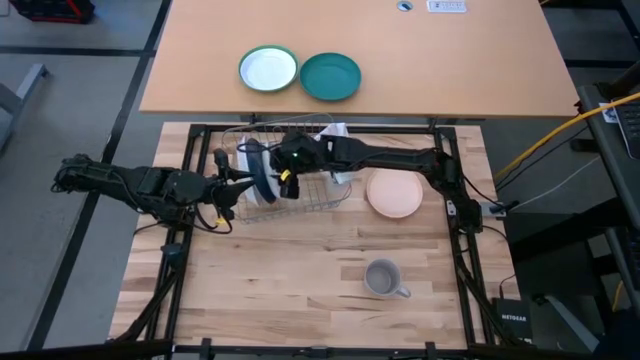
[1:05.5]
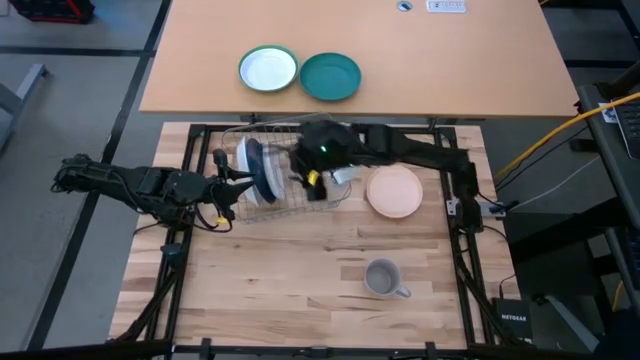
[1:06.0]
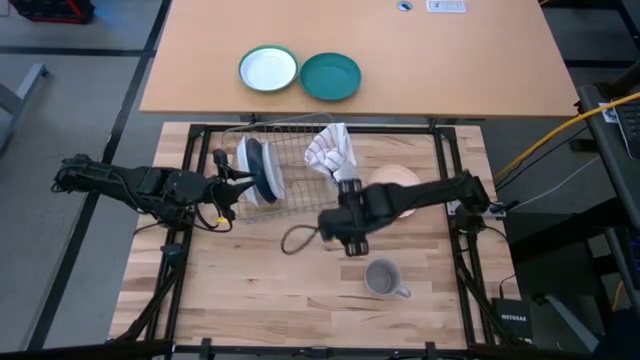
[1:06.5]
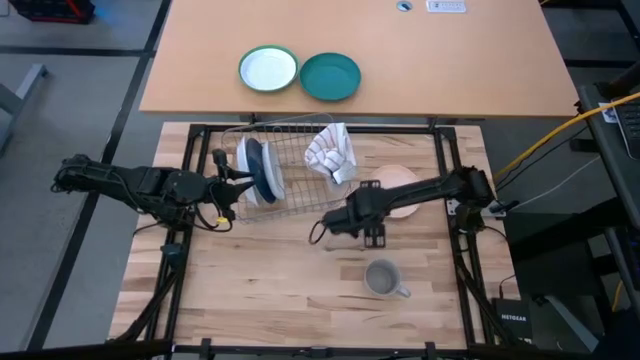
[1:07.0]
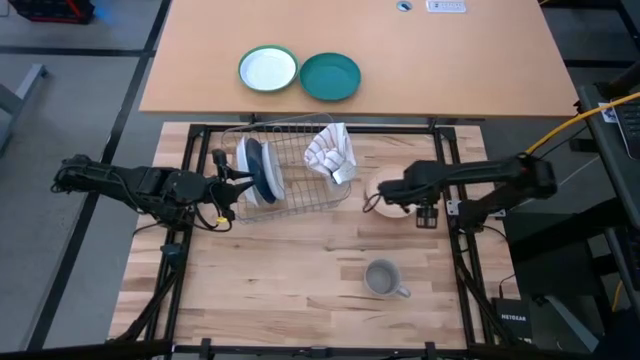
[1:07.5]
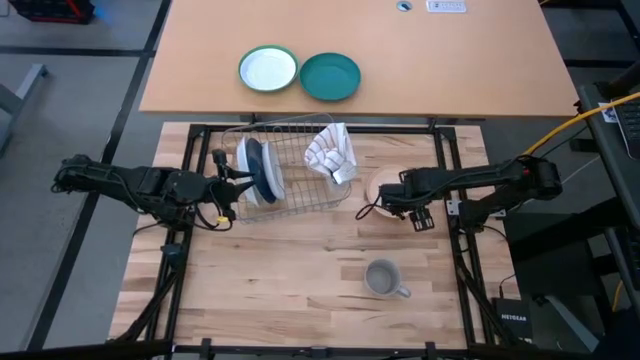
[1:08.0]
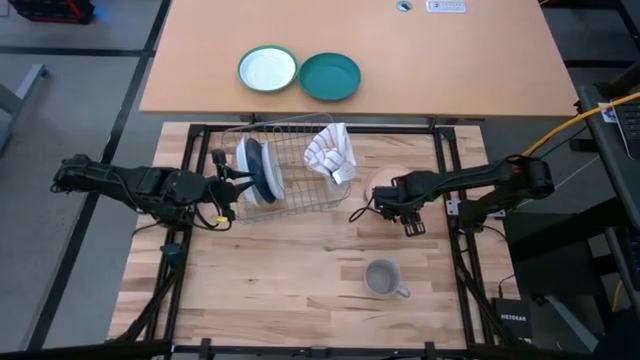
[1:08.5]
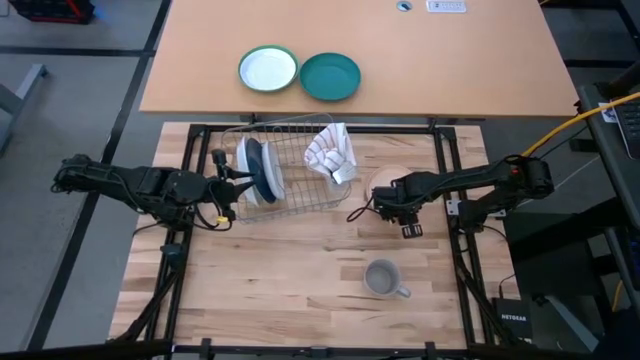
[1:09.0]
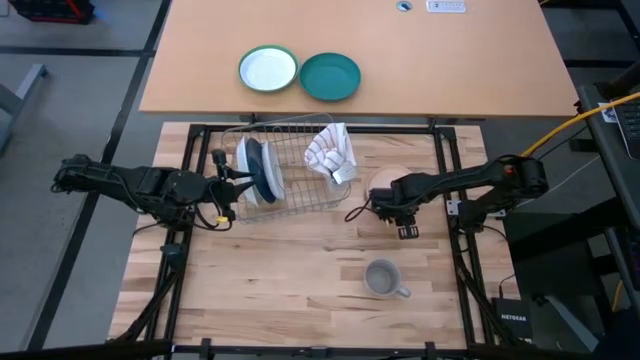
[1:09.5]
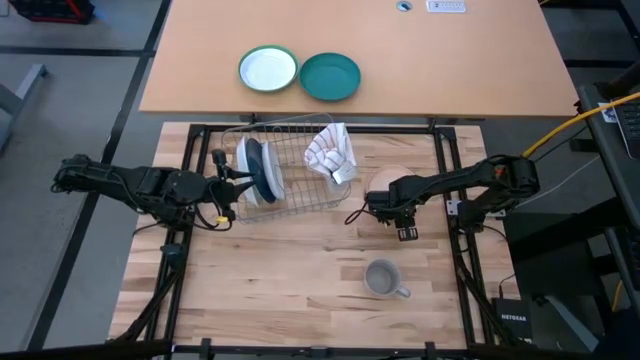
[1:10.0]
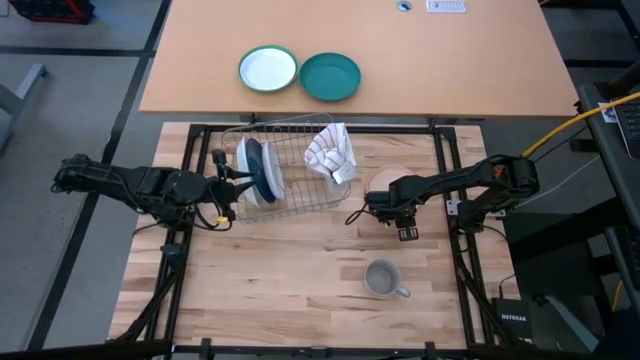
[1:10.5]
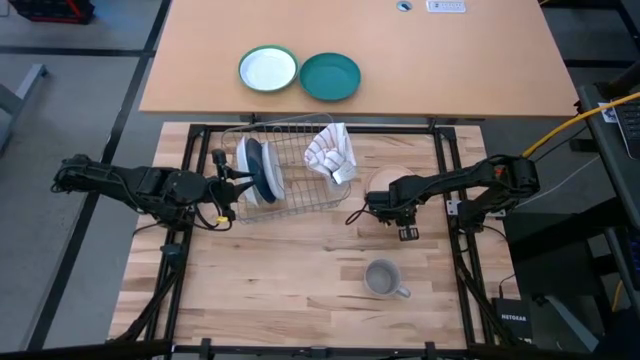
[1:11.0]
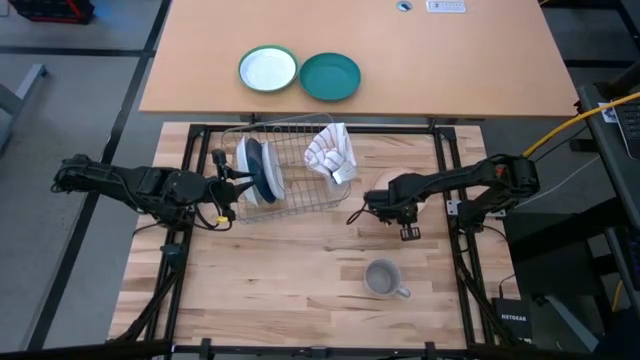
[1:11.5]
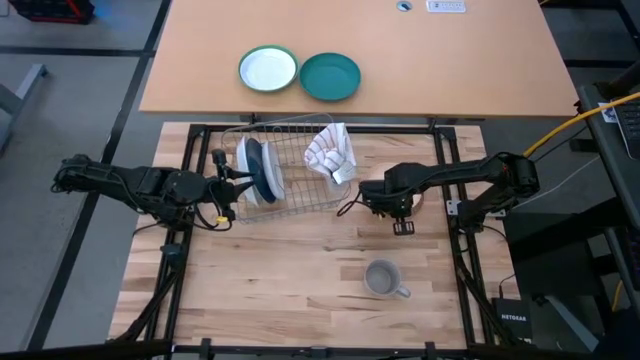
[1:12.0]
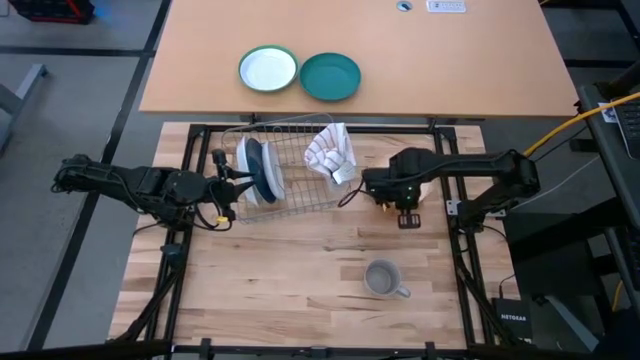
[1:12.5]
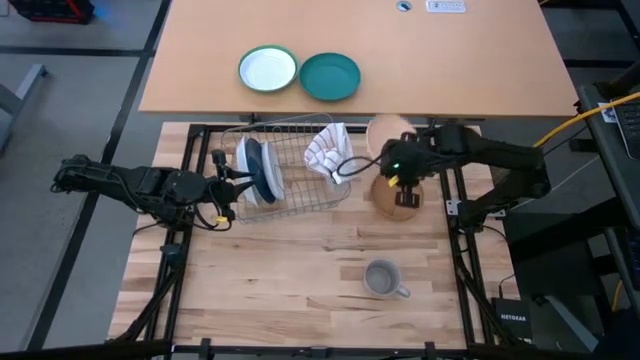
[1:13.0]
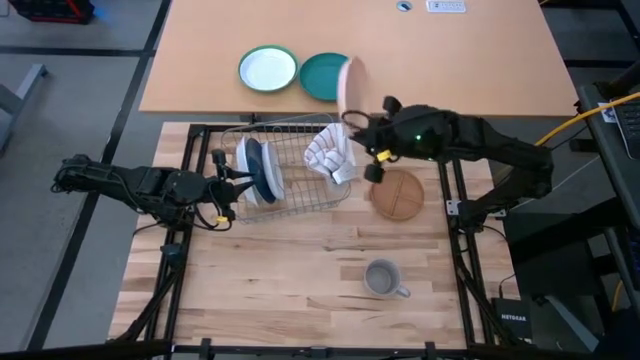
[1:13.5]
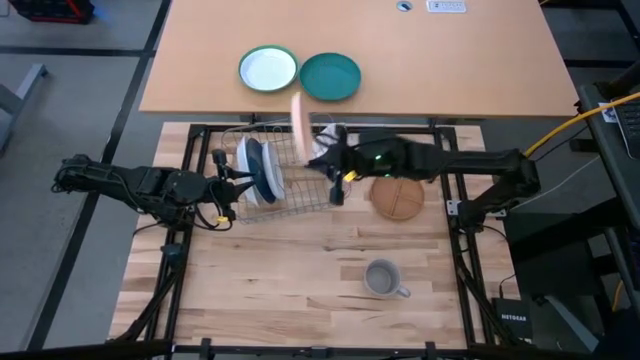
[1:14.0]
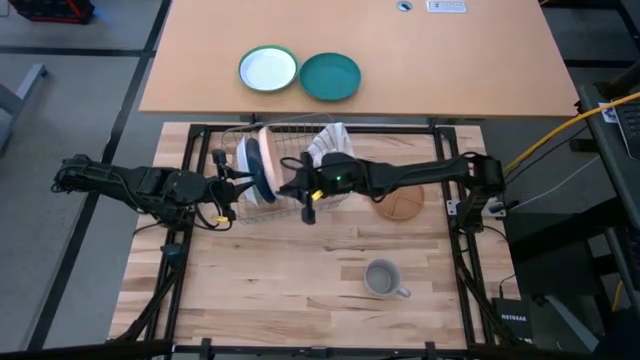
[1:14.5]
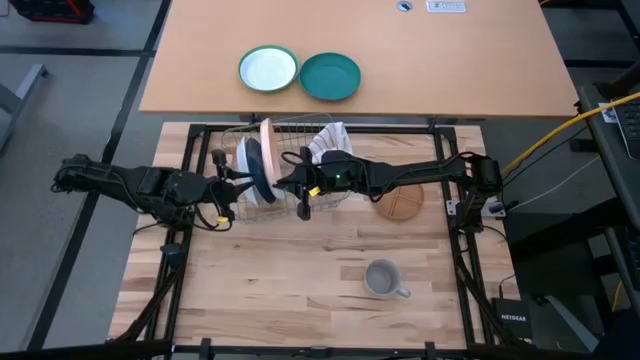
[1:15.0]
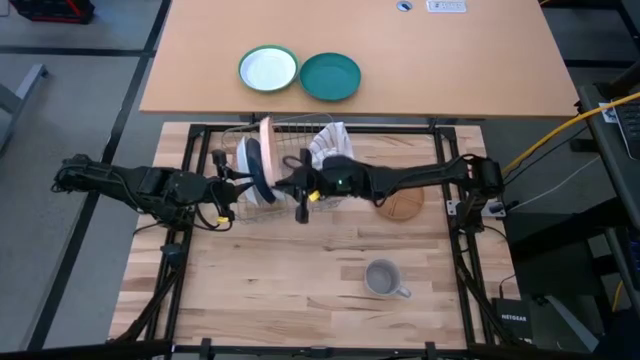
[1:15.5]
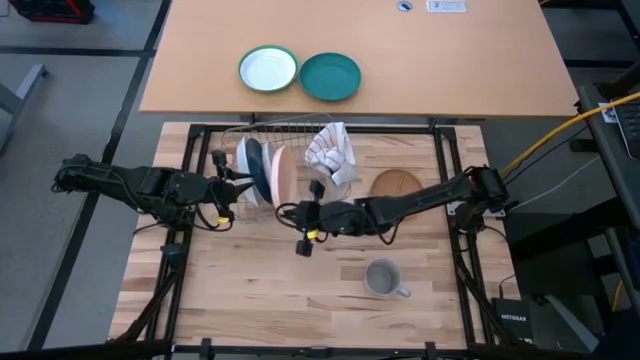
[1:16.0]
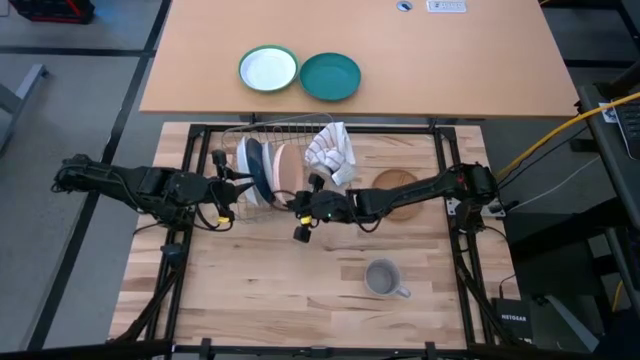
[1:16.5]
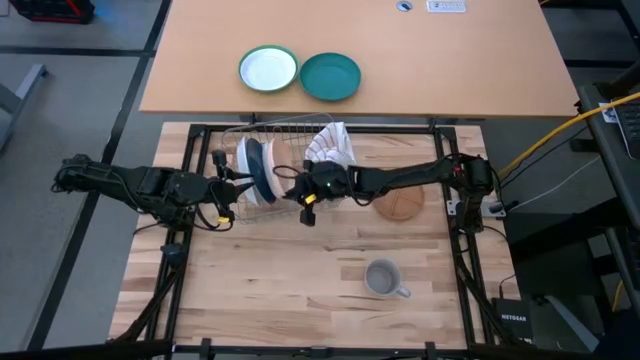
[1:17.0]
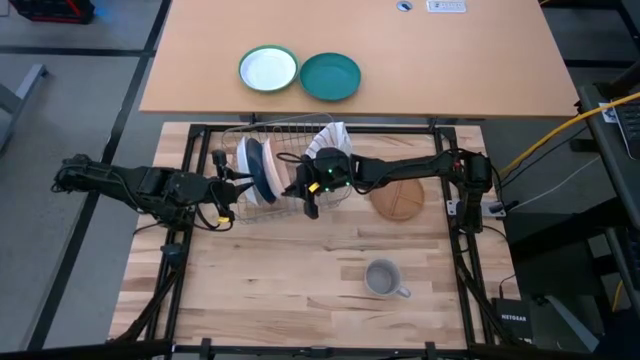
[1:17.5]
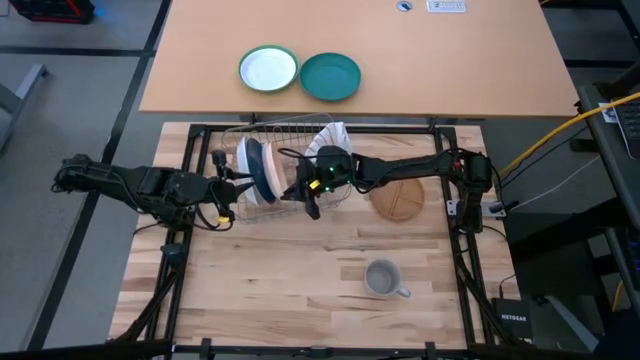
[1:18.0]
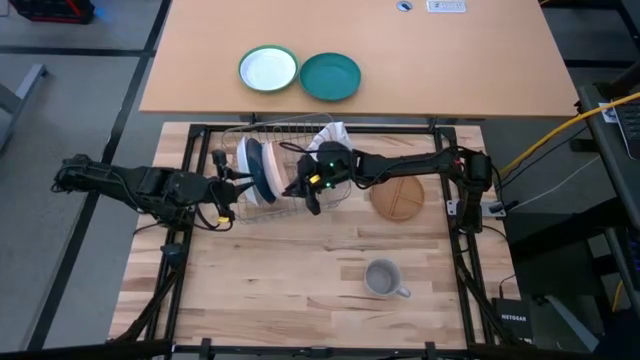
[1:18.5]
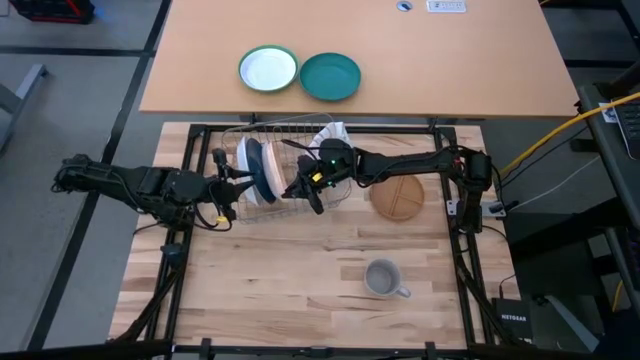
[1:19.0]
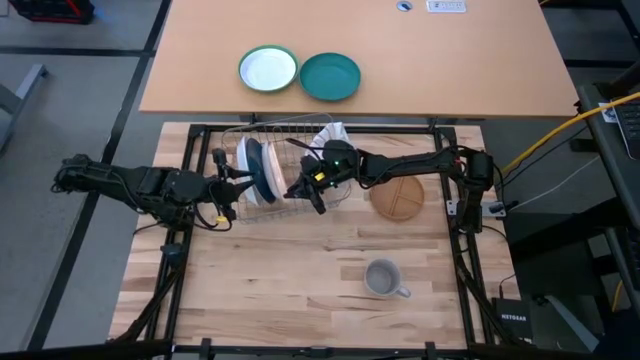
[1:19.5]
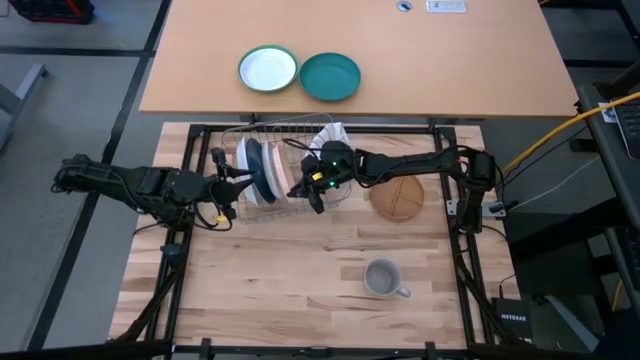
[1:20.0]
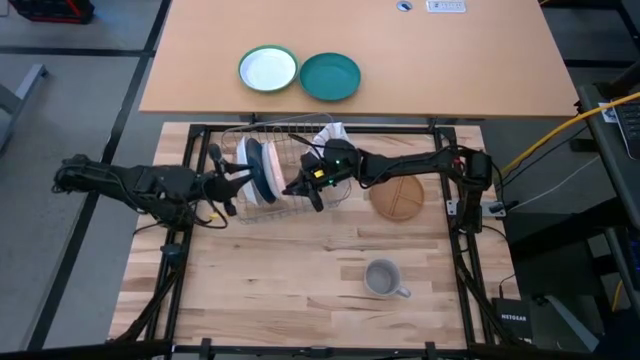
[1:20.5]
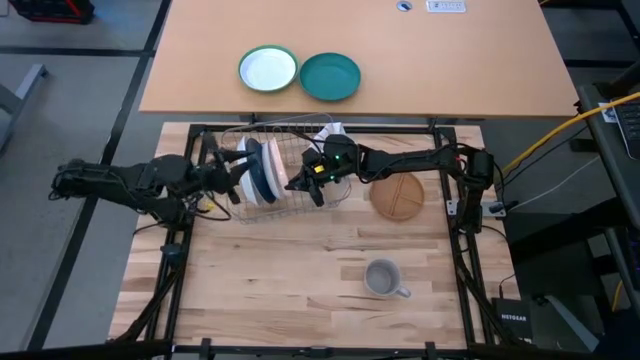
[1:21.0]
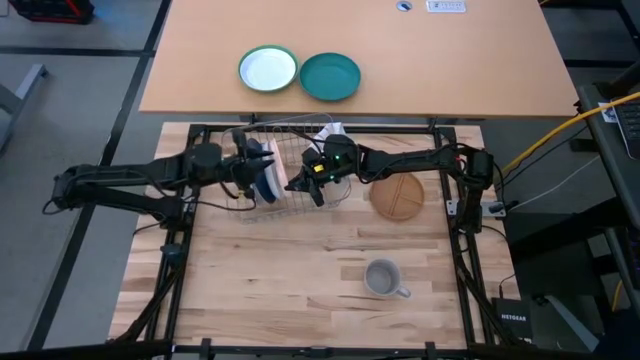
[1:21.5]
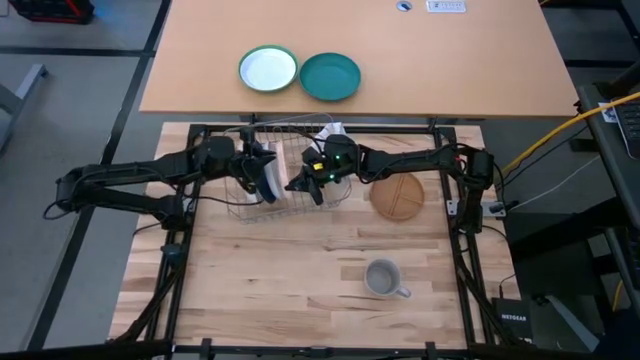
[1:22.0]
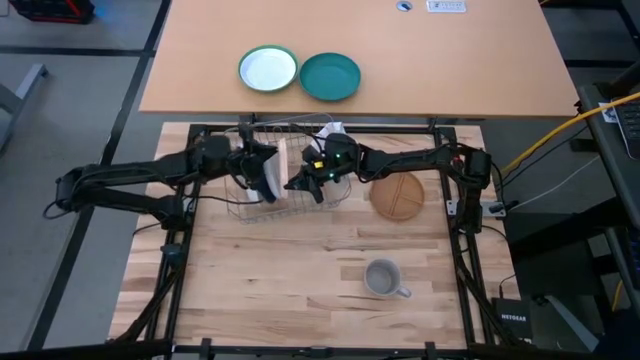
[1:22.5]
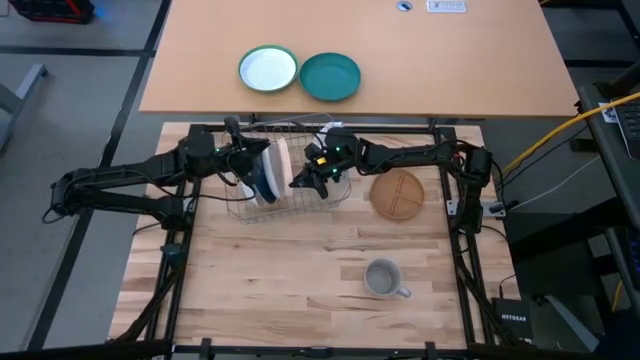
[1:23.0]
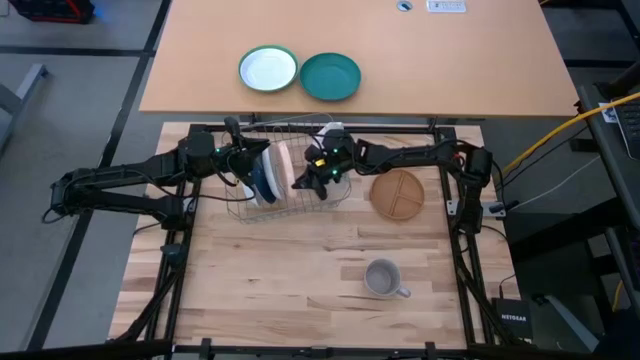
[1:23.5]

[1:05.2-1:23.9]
Task: Sort dishes
Put the peach plate in the dish rack

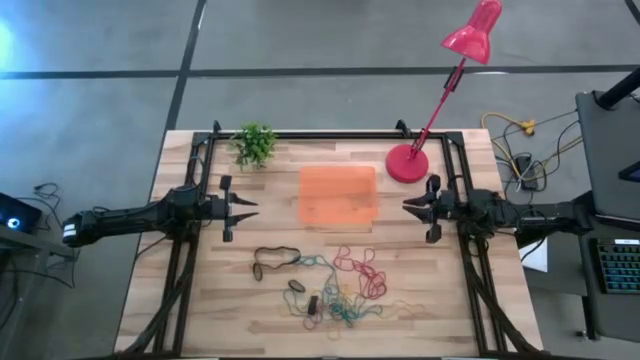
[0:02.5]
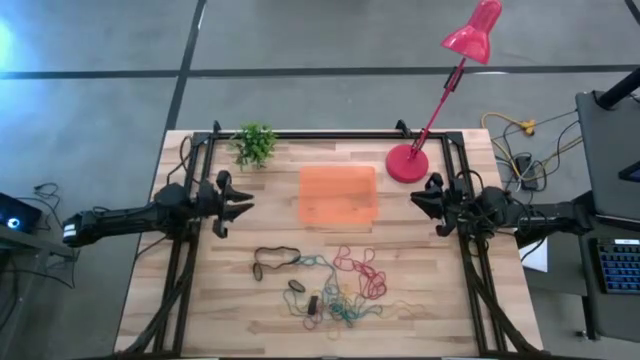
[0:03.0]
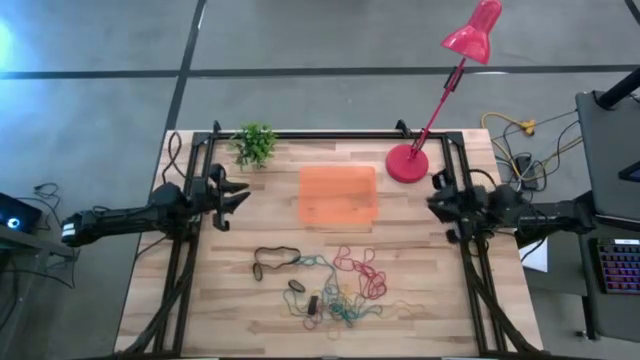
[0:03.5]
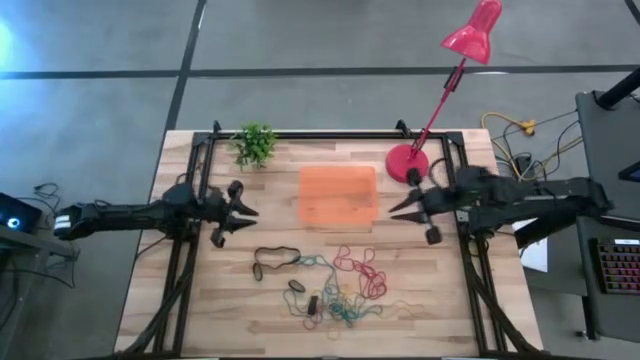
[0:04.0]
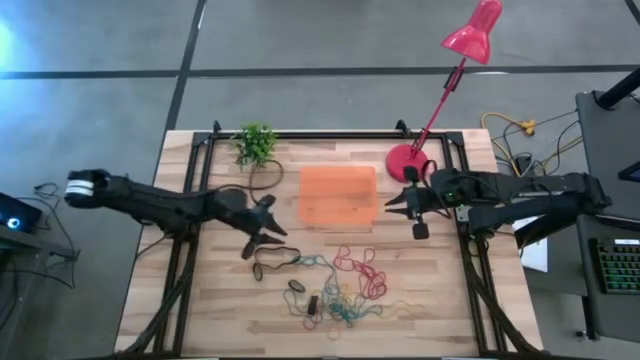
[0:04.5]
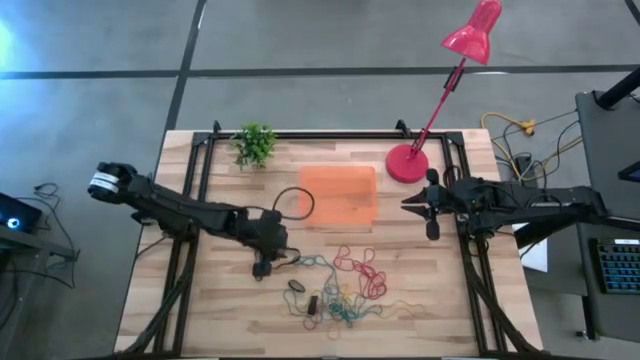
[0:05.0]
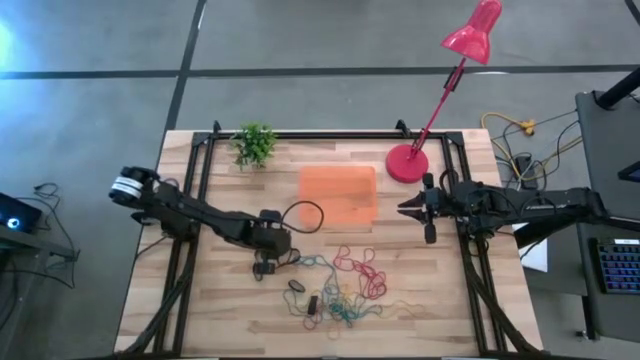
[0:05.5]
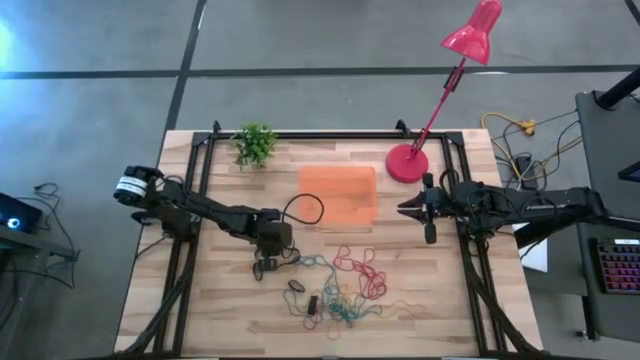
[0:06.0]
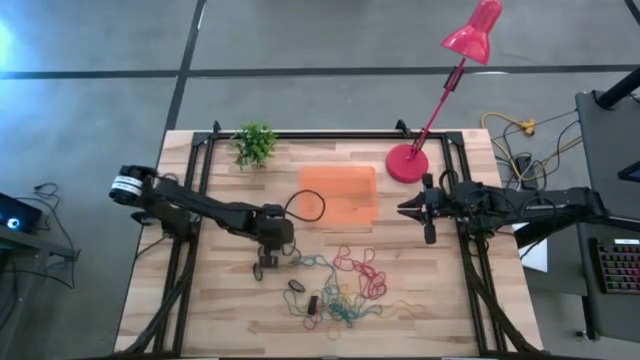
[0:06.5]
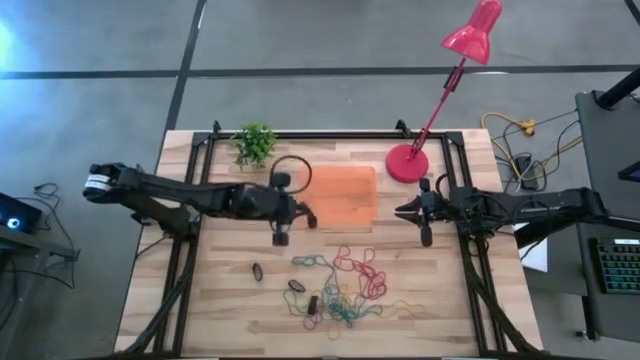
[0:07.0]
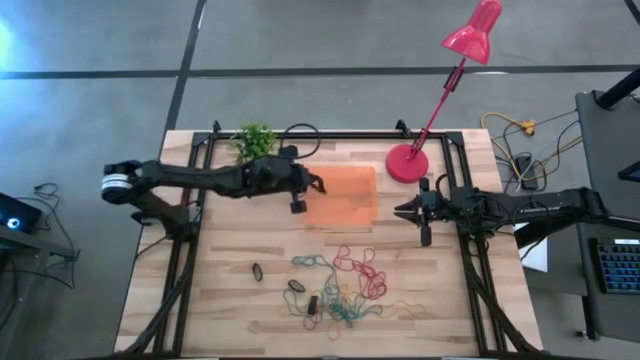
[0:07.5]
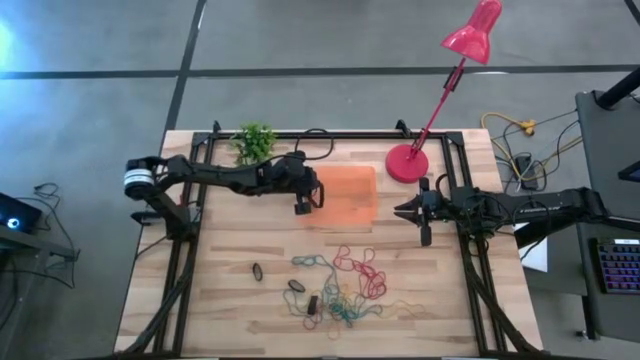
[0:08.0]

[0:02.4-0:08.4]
Task: Pick and place rubber bands into bin
Put the large black rubber band into the bin
